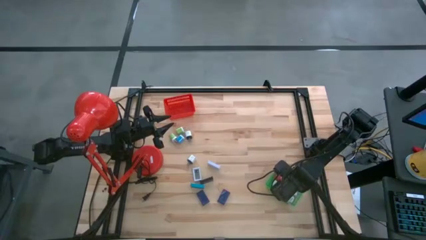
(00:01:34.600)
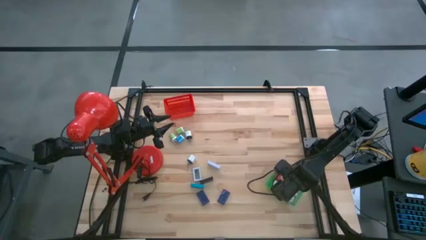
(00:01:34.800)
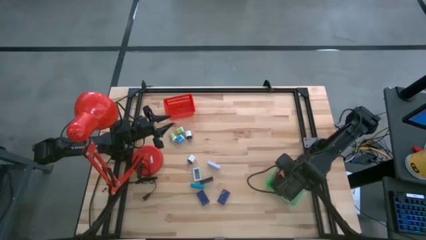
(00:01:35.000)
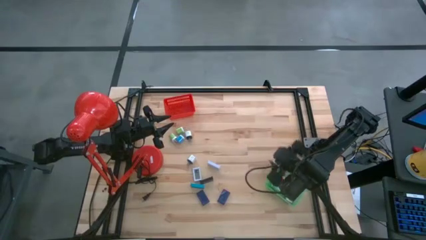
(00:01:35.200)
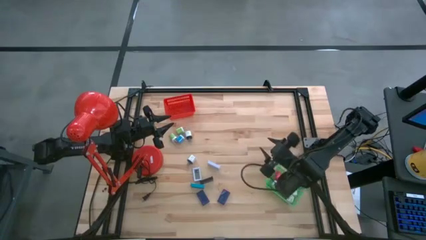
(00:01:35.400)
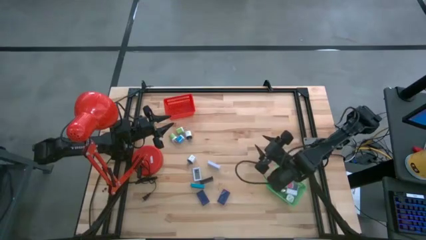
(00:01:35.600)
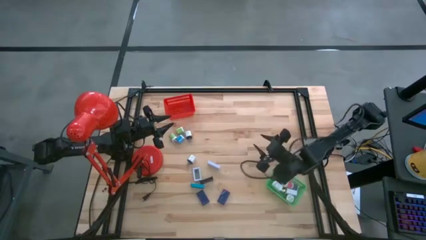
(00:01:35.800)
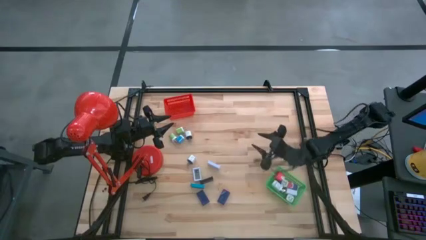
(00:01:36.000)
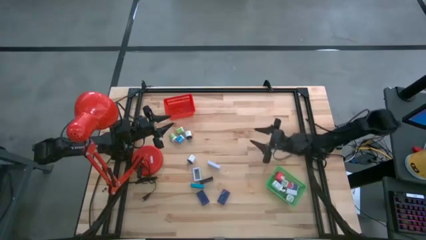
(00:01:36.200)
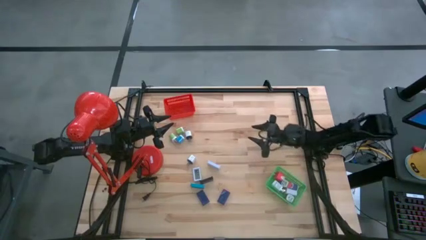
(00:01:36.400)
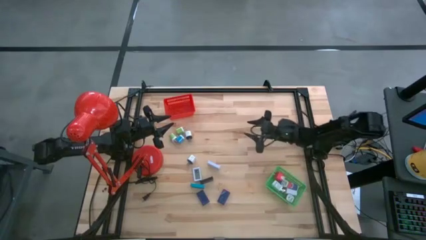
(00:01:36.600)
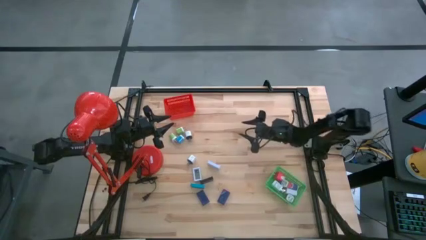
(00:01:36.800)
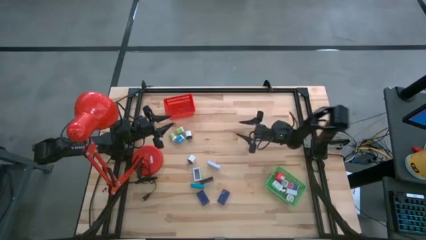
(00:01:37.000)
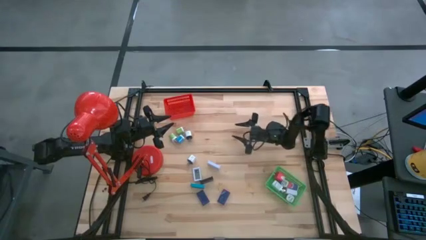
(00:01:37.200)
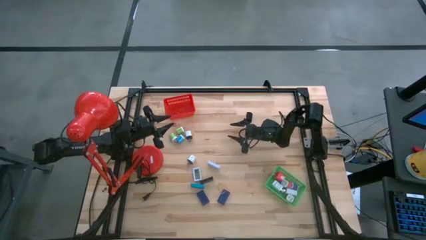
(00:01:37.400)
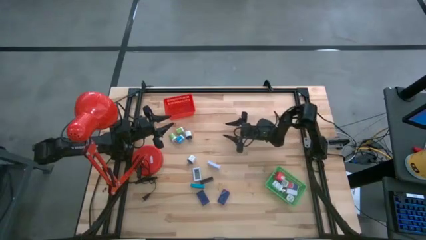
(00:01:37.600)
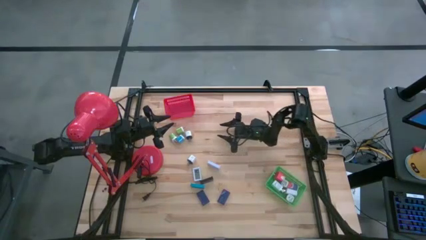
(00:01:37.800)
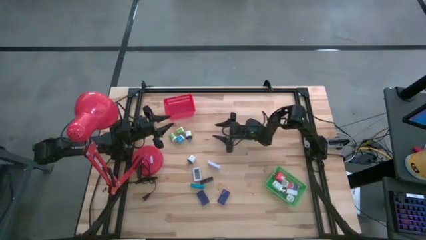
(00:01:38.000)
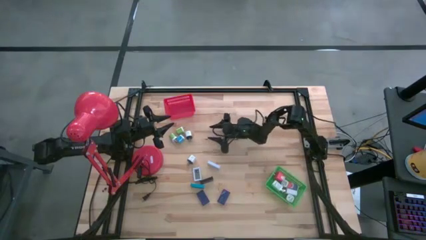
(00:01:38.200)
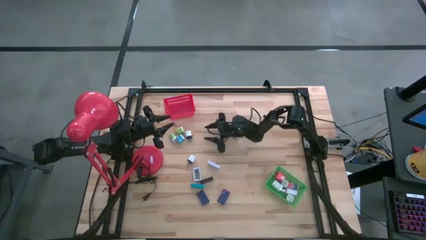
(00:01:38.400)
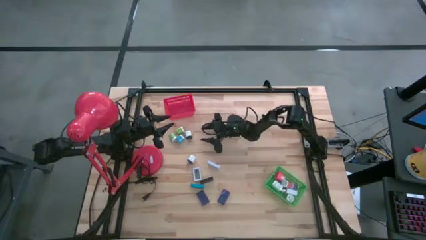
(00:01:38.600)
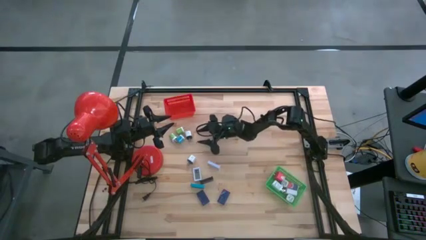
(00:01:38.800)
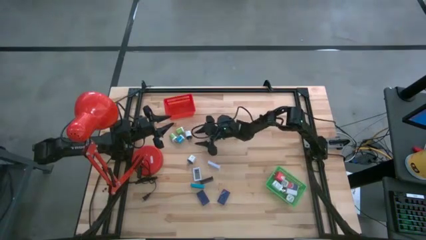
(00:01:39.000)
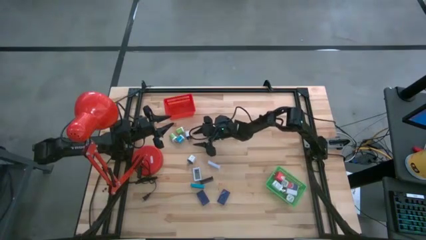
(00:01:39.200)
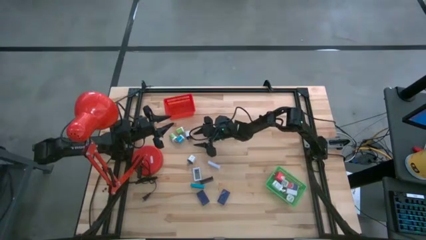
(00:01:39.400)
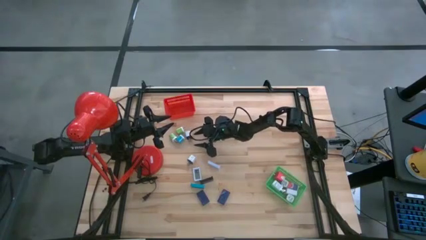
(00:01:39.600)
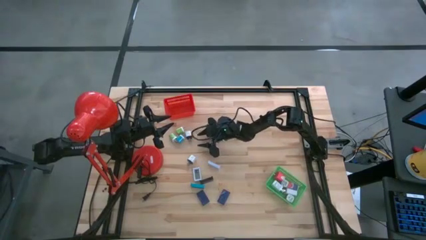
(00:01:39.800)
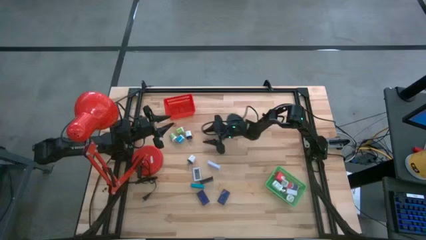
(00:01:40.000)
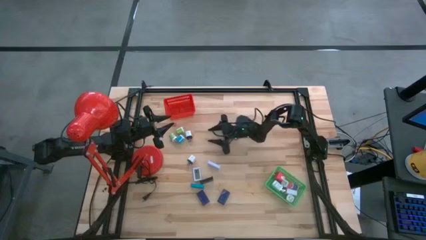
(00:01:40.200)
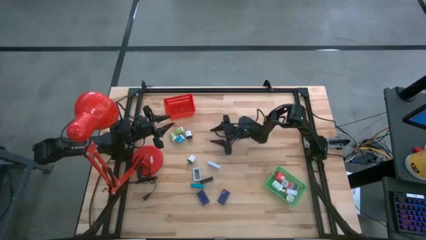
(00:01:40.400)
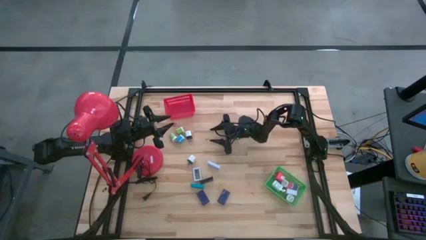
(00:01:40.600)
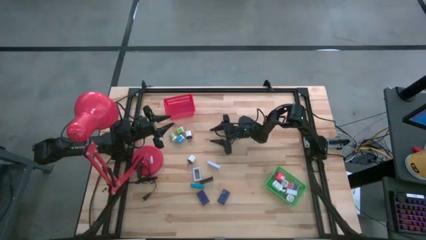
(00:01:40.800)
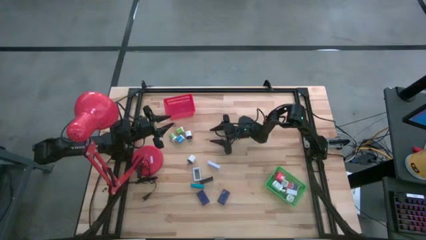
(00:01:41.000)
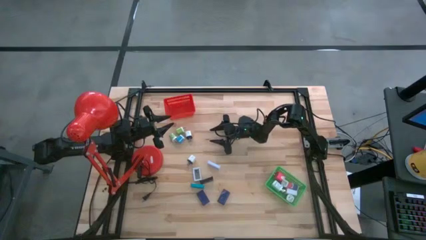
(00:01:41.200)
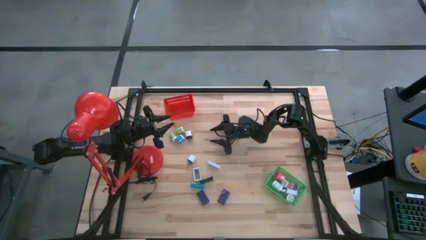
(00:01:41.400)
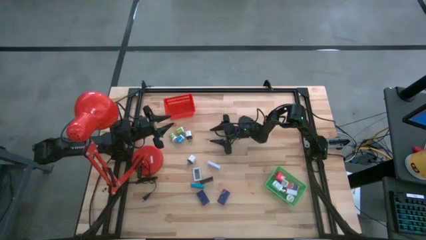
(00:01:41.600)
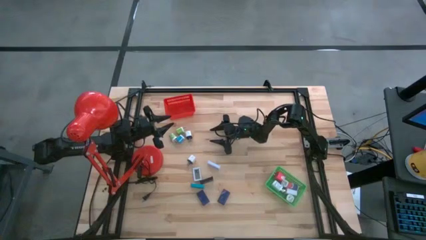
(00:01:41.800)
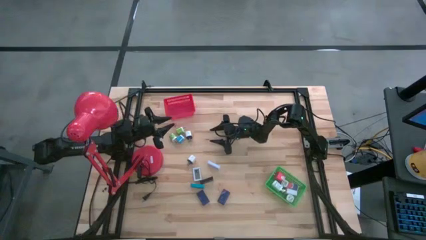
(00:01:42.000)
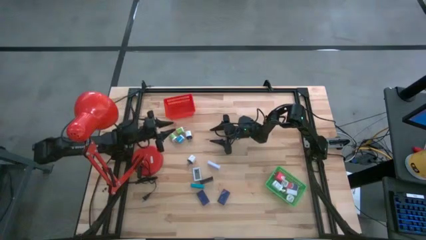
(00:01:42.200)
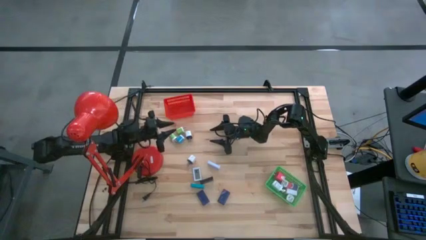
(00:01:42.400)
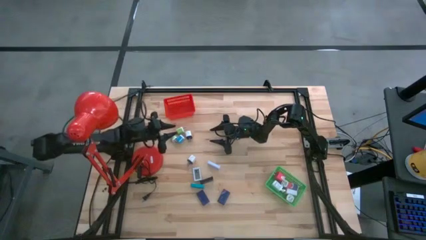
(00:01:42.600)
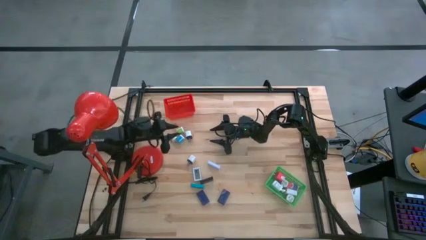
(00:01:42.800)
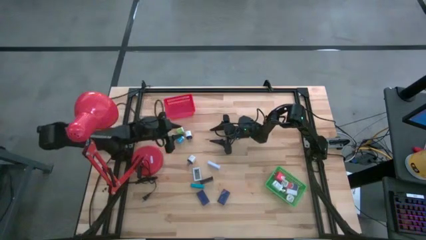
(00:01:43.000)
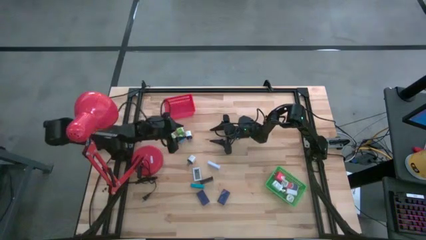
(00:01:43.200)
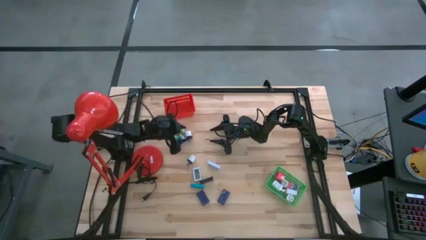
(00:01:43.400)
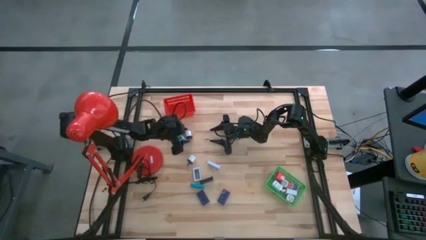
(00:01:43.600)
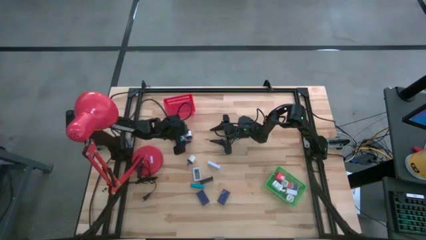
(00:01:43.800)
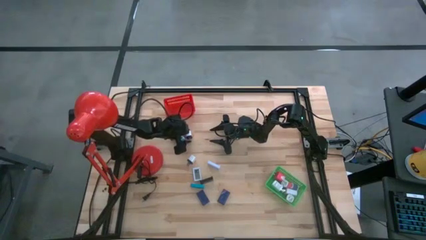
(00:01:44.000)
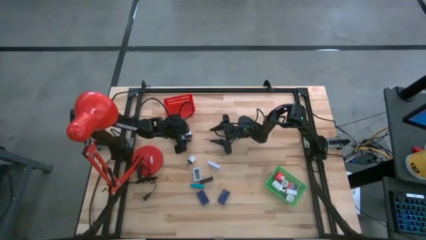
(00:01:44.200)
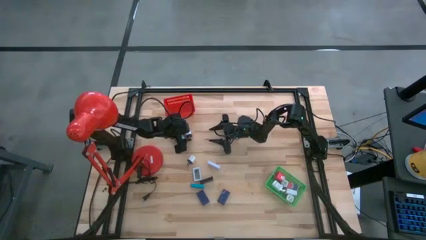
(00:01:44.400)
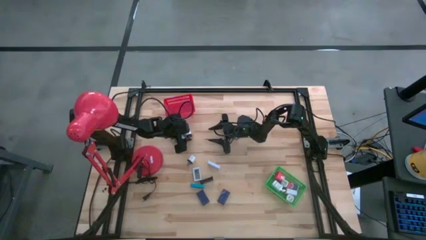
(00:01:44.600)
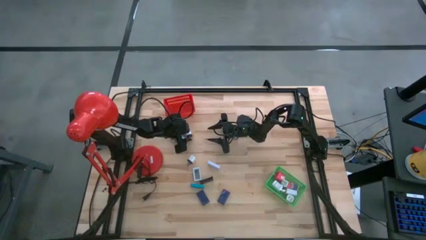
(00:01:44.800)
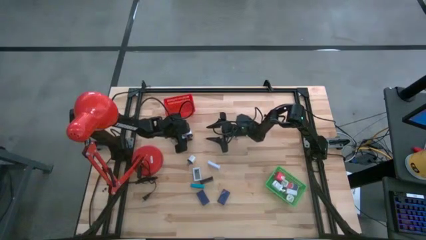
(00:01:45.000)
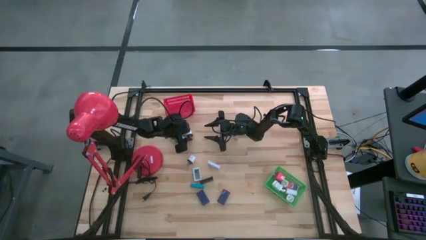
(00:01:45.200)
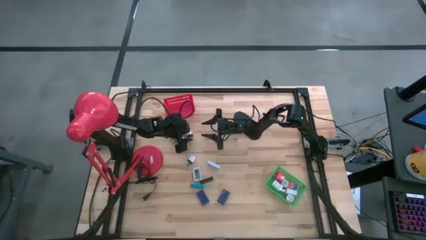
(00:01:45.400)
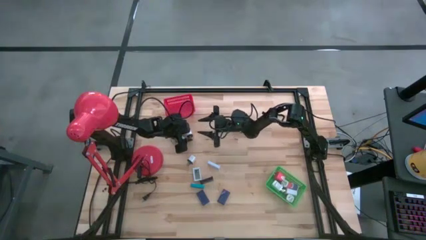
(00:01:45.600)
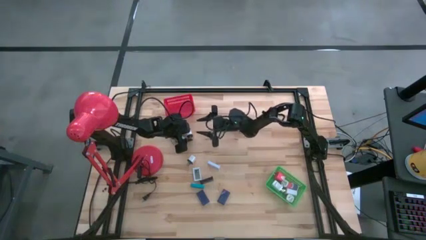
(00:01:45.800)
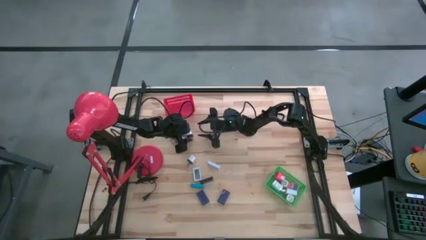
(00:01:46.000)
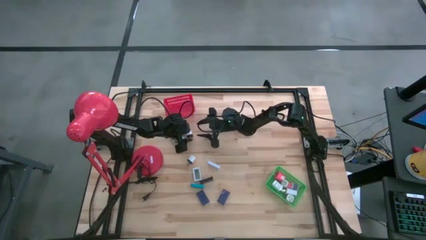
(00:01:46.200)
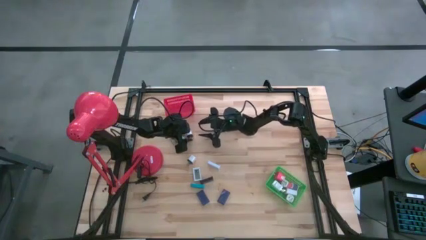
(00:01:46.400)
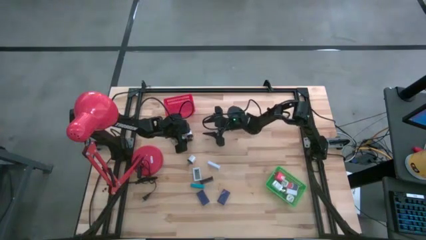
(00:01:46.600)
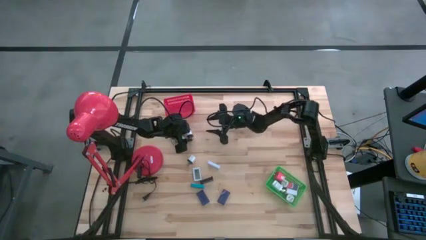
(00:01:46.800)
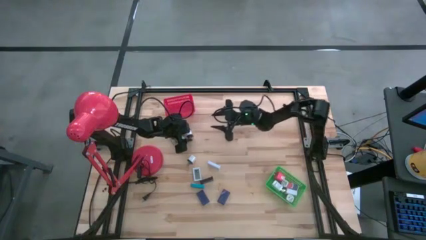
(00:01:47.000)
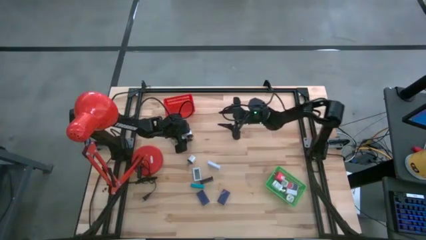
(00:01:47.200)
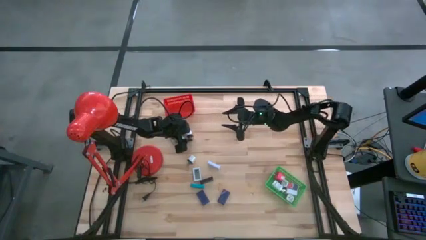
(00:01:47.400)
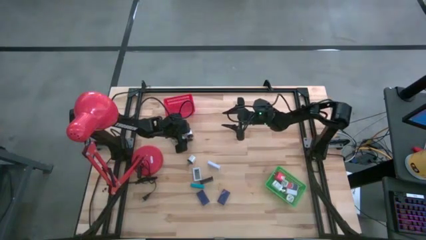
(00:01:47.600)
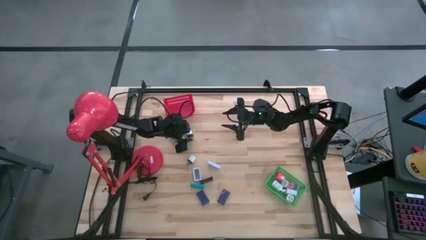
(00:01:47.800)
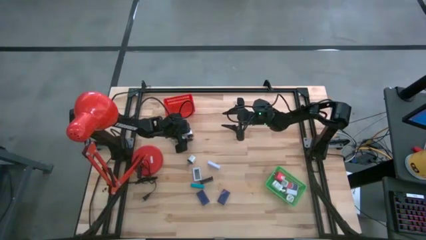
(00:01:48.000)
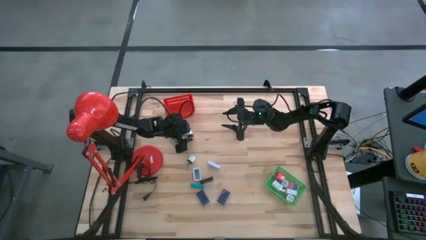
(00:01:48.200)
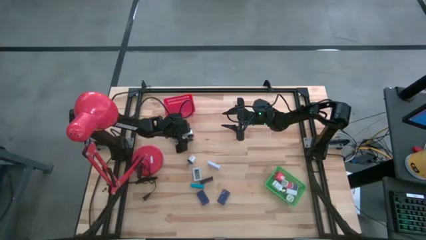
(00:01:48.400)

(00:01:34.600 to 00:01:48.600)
Task: Pick & Place Office items
Put the top white black charger adapter into the green bin

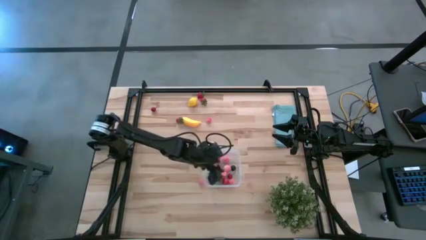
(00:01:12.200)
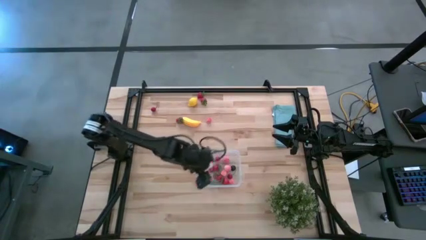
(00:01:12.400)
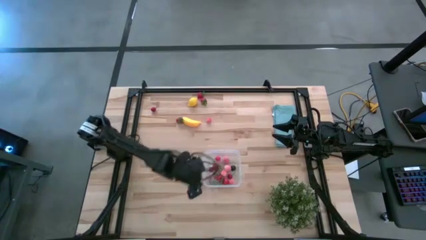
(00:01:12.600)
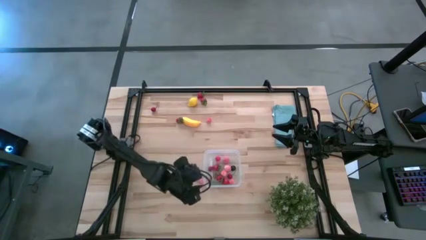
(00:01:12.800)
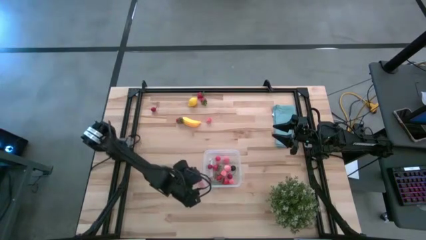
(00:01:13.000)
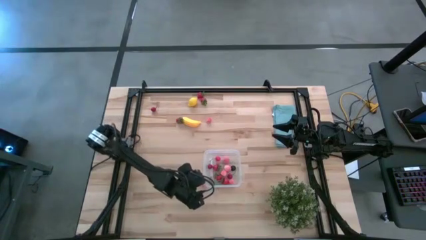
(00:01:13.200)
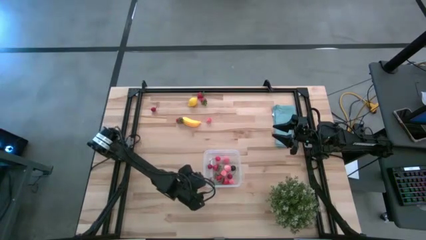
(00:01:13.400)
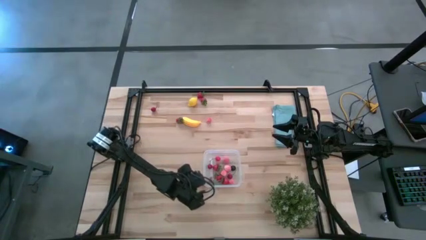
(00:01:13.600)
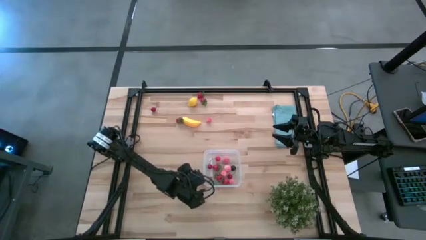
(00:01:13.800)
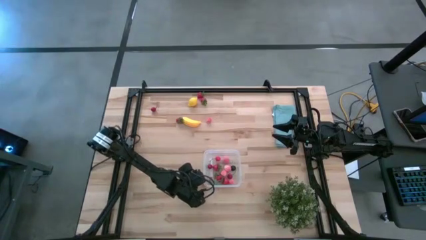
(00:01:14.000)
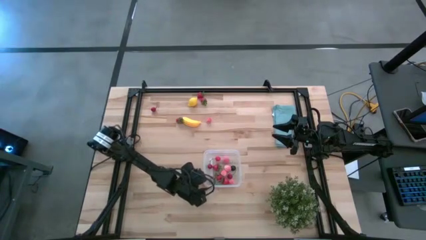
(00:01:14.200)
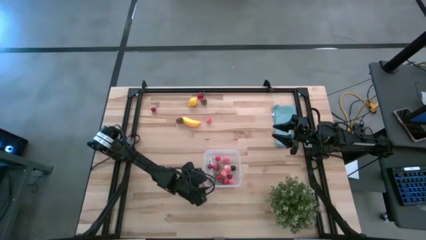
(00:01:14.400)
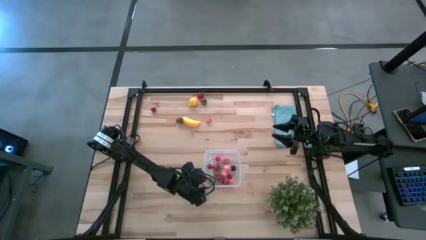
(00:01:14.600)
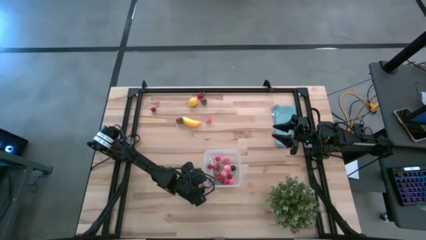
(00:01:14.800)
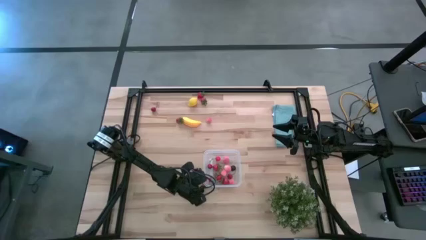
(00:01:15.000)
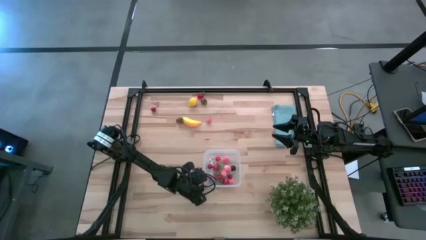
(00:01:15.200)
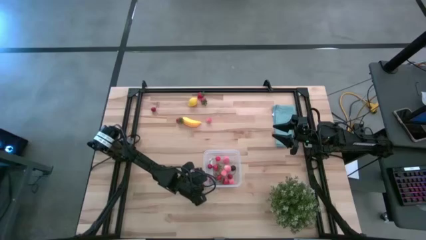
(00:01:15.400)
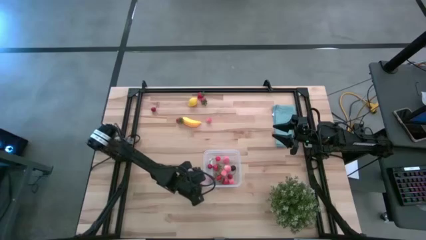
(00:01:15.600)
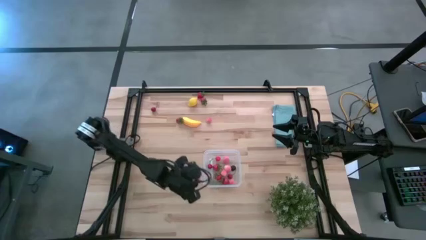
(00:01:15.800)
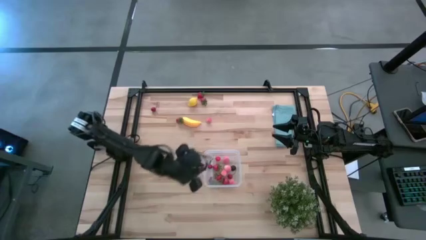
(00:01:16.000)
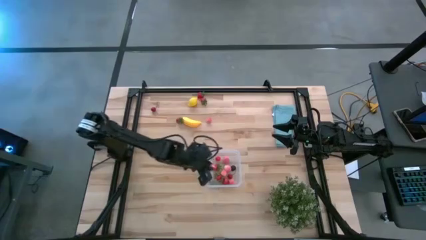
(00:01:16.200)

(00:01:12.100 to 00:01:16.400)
Task: Pick and placing Produce into tupperware
Put the pink peach into the transparent bin
